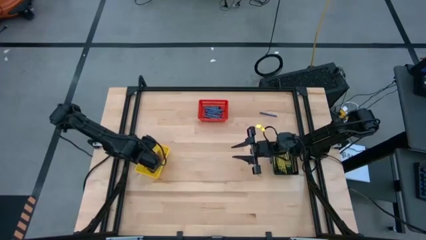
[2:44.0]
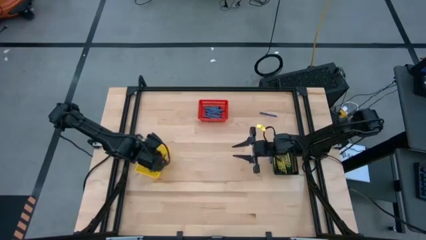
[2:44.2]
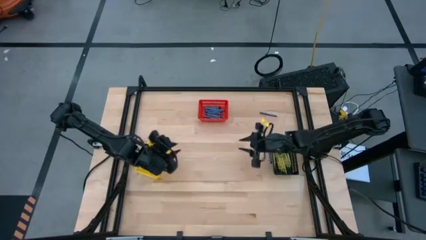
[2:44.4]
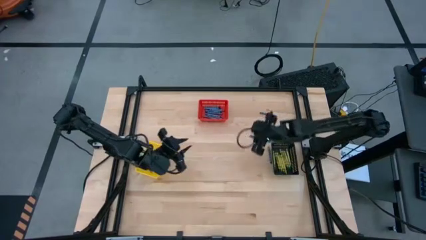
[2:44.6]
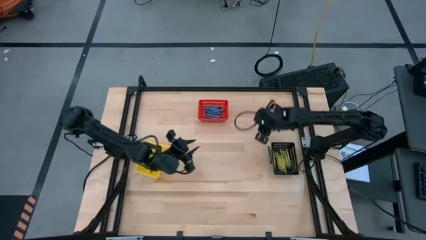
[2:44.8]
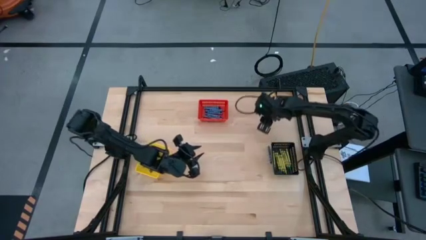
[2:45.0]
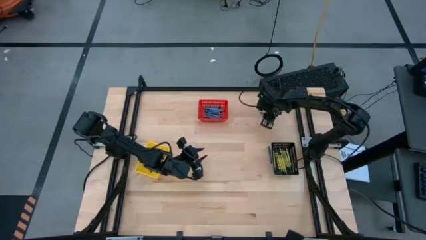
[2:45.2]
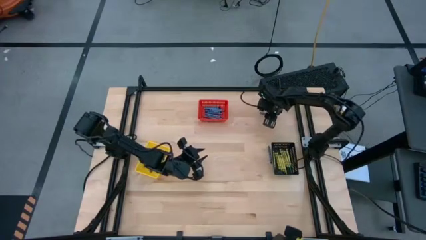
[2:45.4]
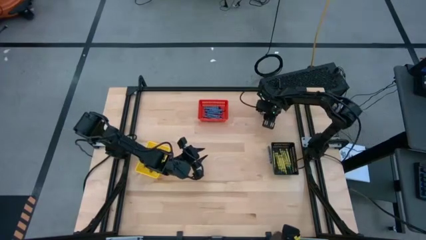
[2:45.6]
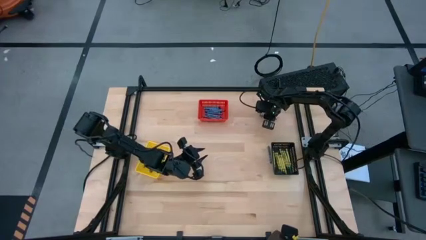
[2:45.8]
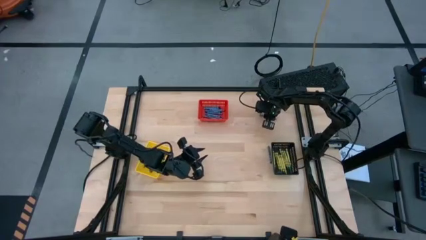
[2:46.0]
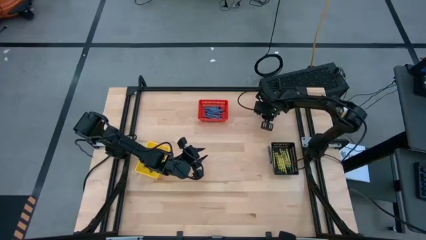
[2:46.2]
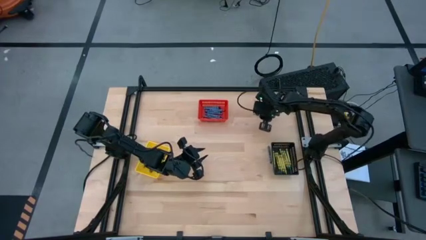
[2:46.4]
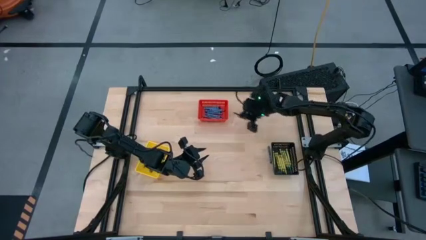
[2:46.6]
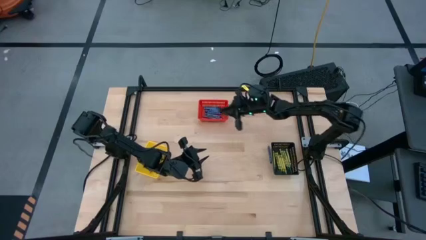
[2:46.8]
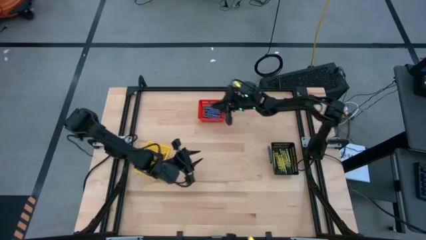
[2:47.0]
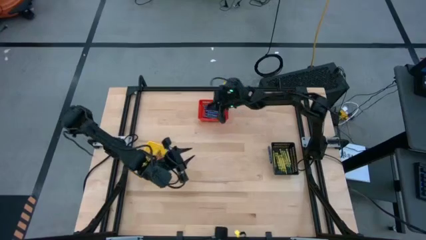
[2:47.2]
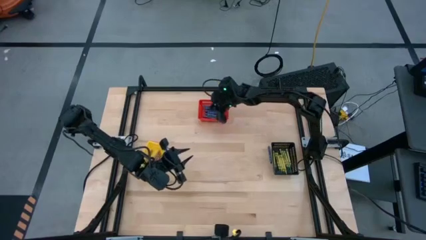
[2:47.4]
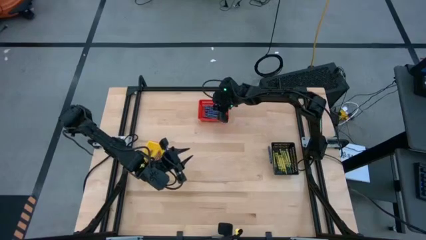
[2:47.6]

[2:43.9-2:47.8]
Task: Sort crayons
Put the blue crayon into the red basket

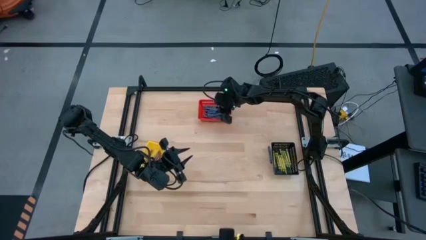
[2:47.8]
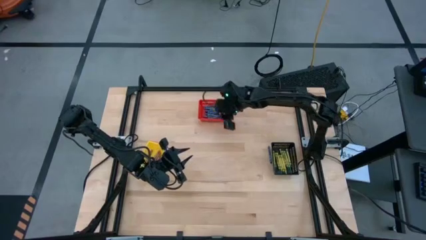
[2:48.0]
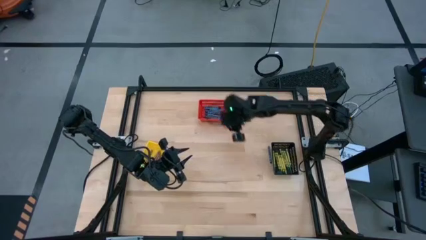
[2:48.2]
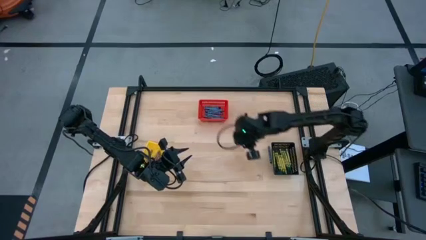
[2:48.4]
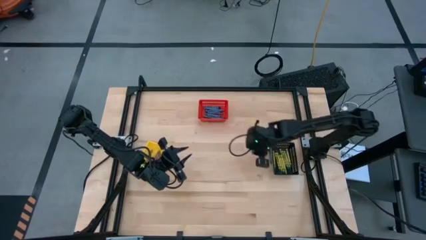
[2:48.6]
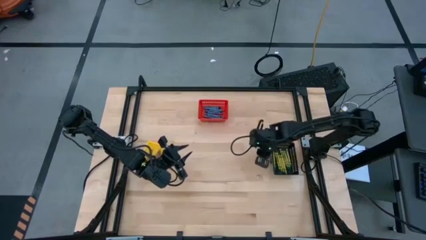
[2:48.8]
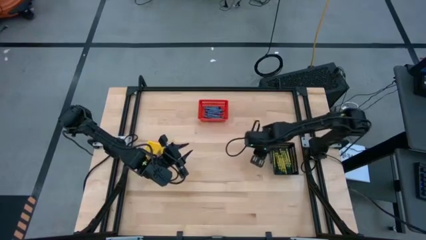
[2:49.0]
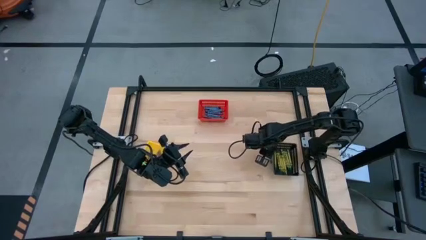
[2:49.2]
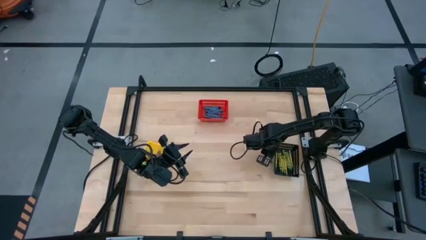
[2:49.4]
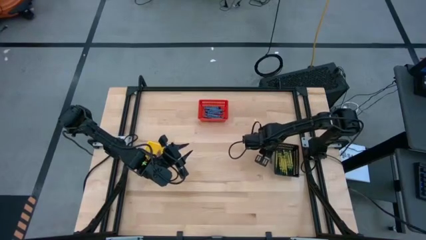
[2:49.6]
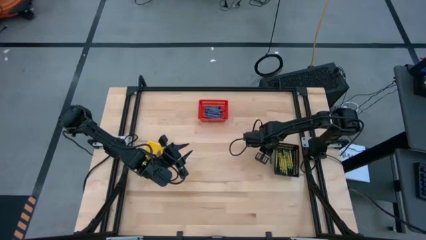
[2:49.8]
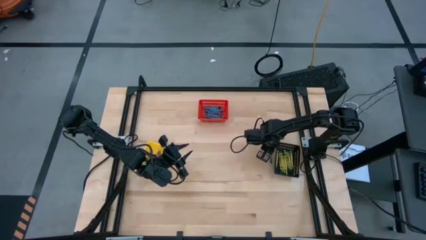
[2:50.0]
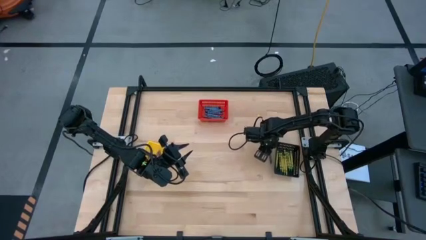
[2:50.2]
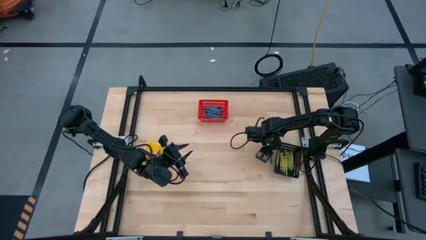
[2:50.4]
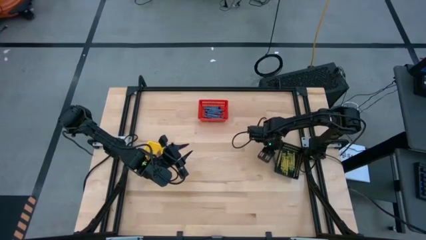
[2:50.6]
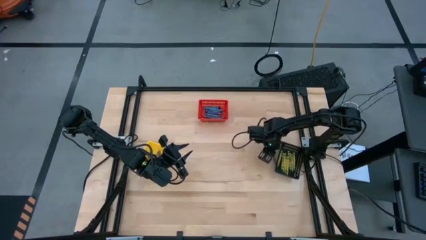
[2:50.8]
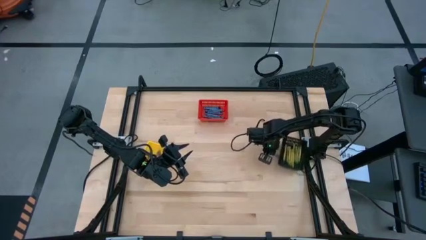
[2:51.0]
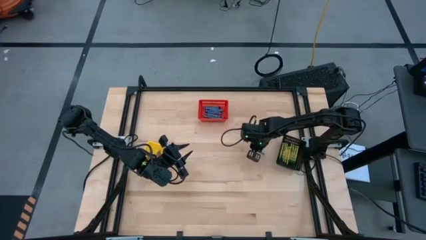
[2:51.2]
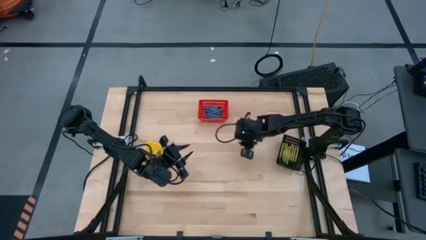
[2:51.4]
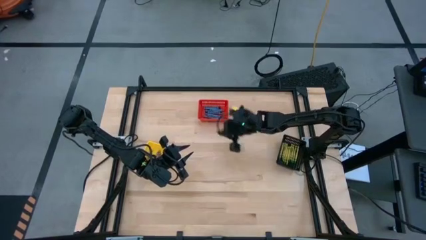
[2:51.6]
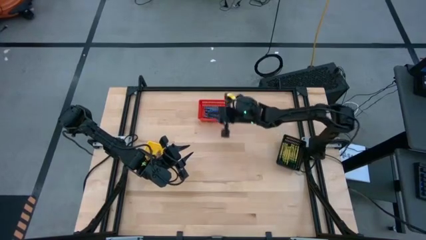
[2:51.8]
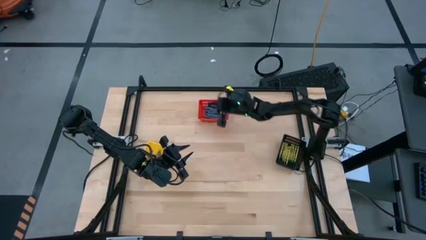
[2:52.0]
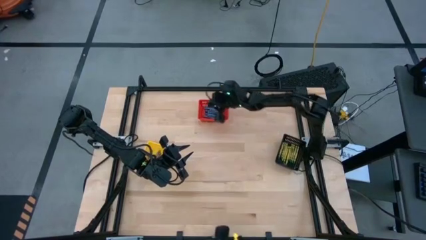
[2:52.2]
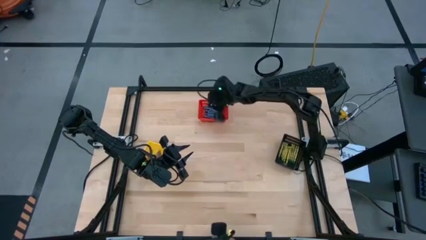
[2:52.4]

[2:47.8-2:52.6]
Put the blue crayon into the red basket

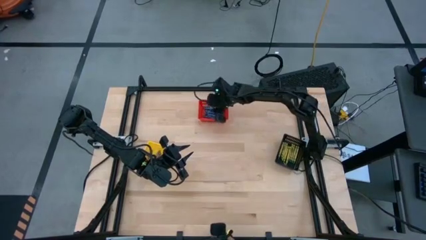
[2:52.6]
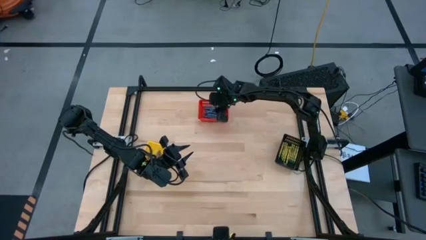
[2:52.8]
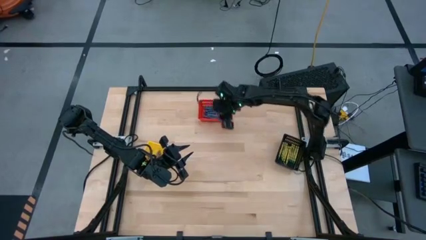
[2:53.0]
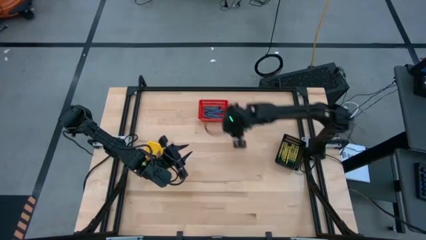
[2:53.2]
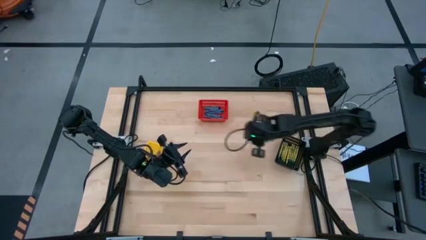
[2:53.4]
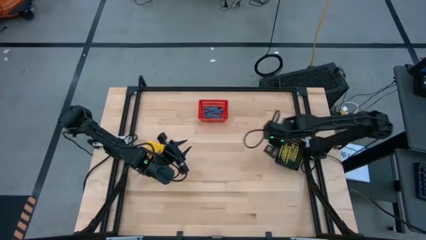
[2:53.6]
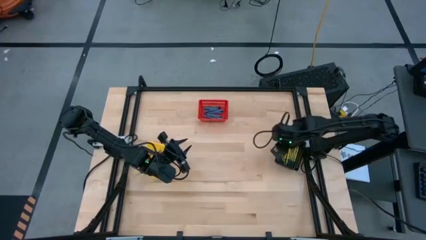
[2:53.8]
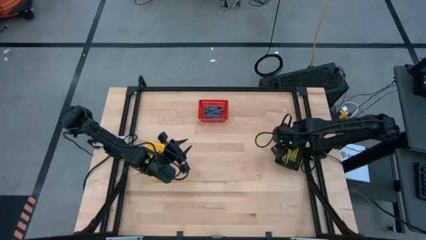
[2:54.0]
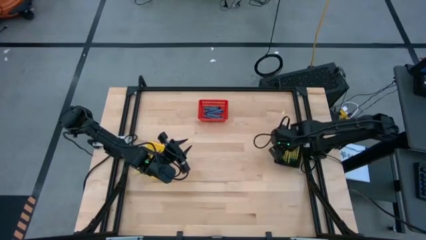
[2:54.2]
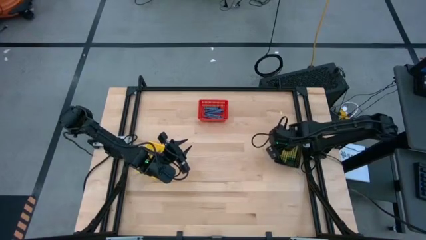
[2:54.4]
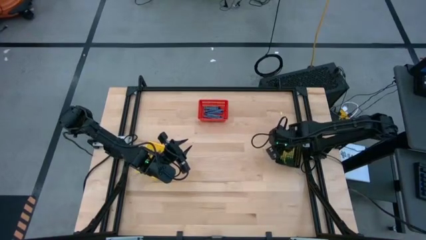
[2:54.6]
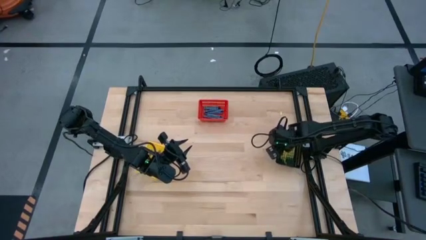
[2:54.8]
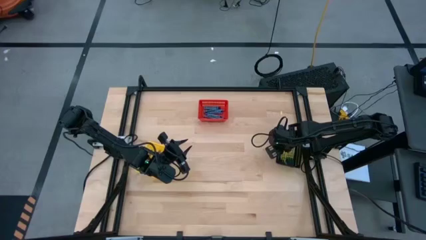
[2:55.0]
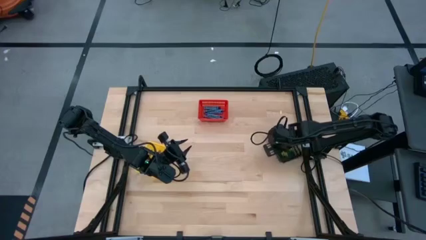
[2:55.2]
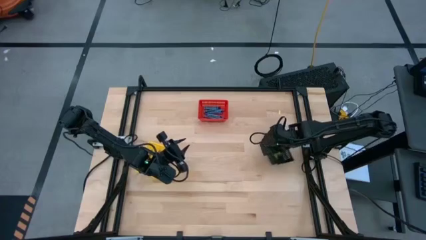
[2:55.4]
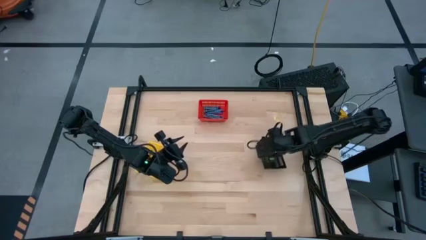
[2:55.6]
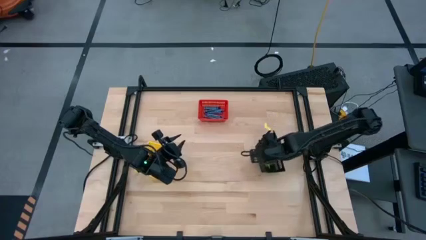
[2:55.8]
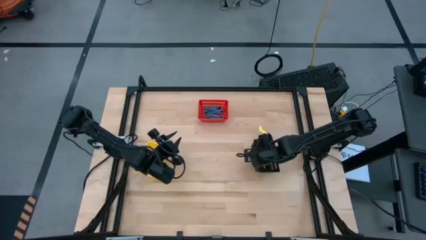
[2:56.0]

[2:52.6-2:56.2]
Adjust the black basket

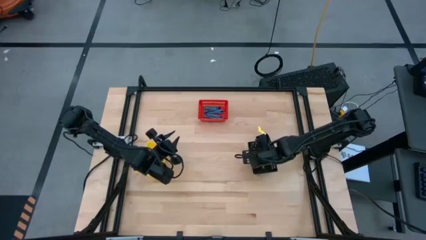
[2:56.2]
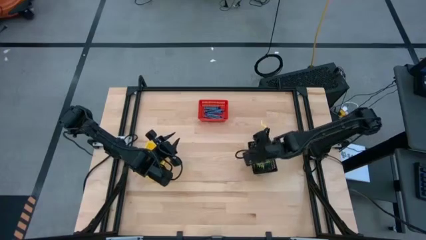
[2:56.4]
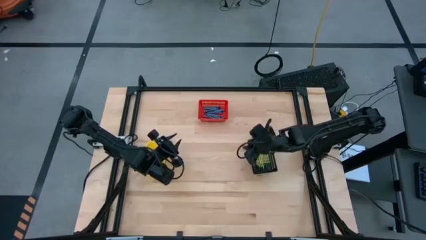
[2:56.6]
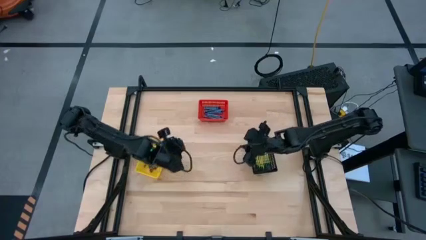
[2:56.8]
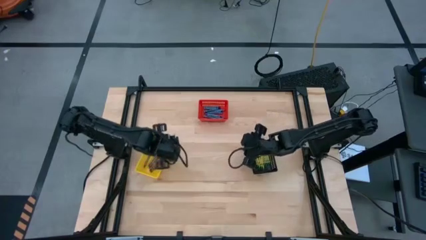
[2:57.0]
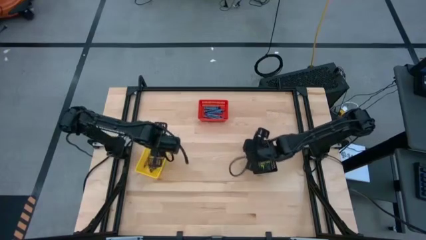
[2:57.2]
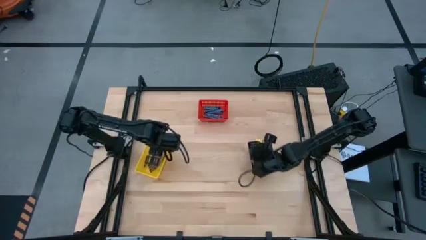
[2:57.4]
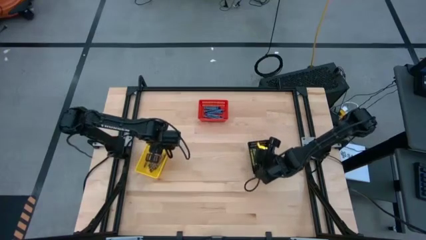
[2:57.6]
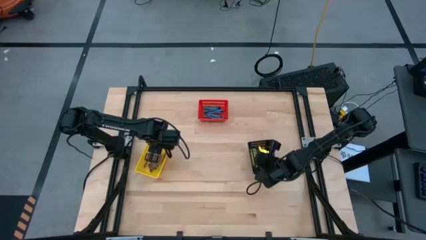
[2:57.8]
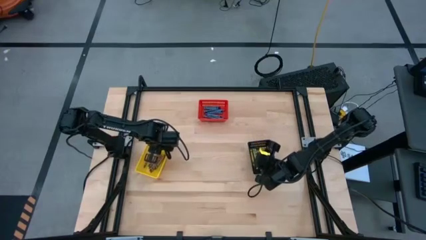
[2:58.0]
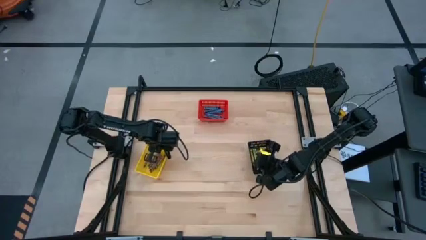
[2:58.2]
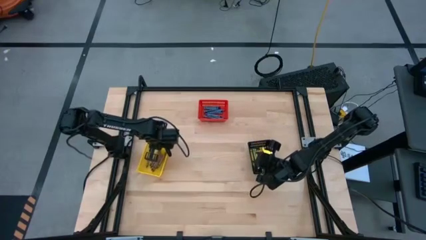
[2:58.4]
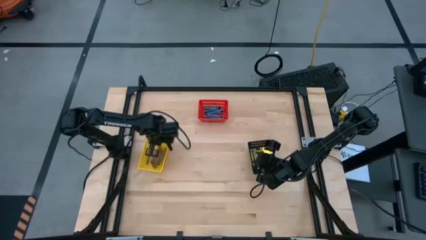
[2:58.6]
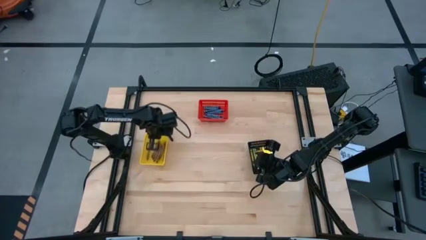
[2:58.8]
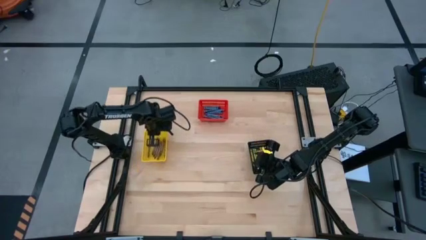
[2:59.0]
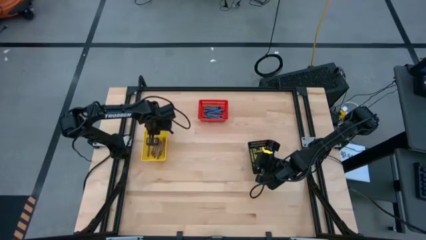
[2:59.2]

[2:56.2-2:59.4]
Adjust the yellow basket

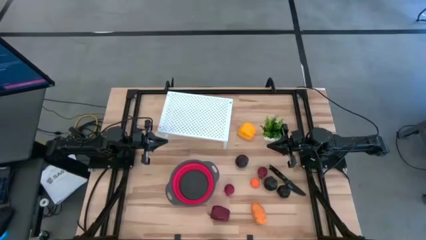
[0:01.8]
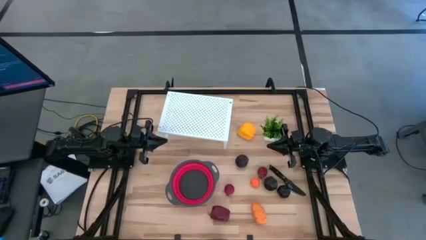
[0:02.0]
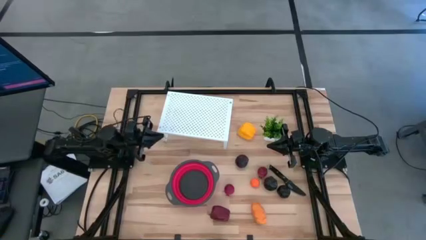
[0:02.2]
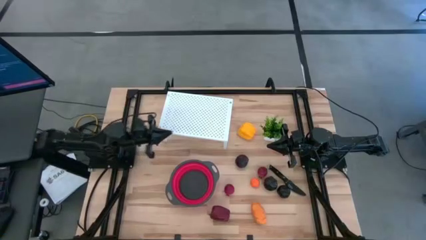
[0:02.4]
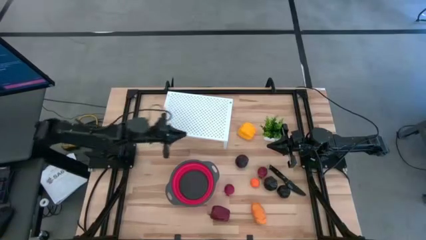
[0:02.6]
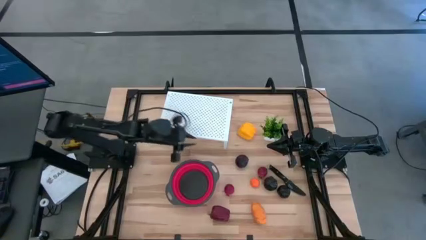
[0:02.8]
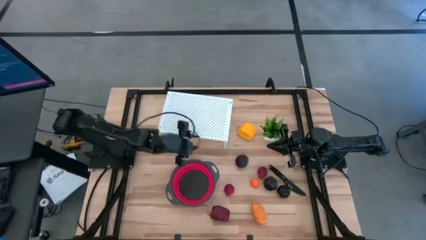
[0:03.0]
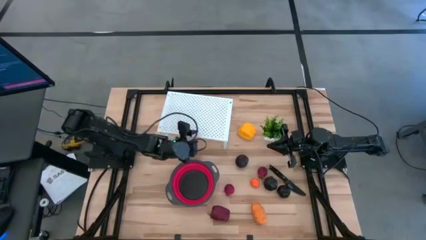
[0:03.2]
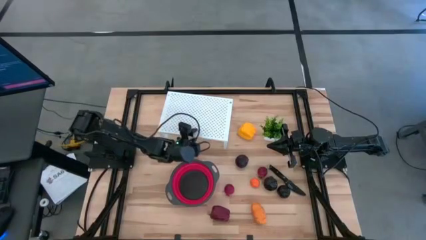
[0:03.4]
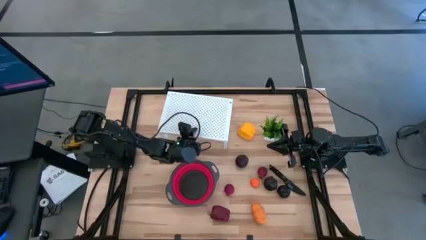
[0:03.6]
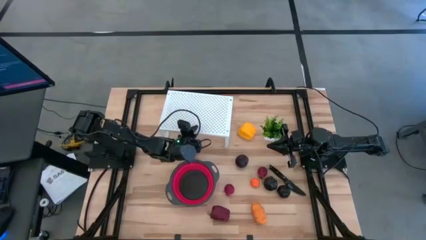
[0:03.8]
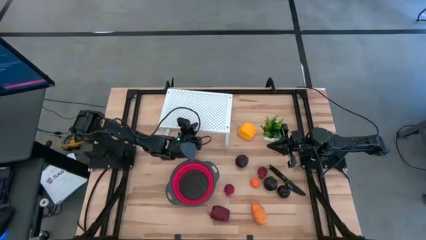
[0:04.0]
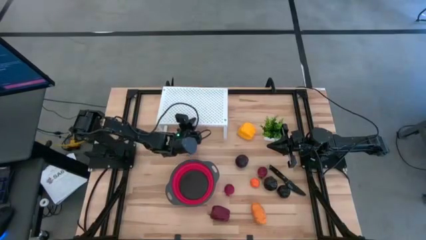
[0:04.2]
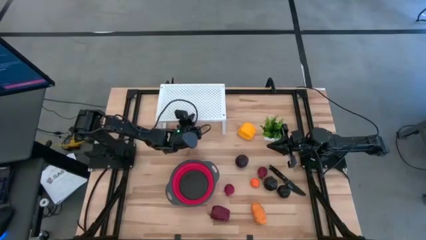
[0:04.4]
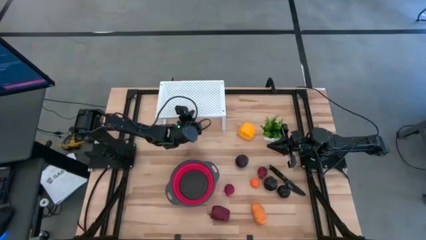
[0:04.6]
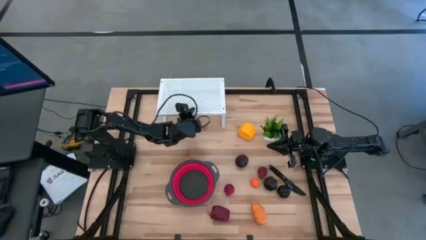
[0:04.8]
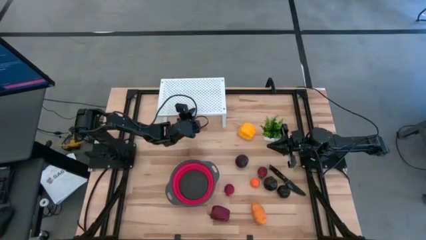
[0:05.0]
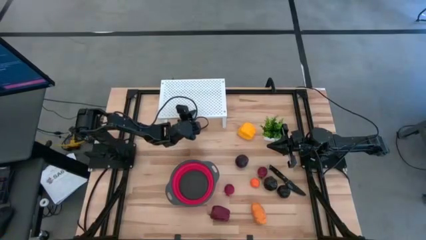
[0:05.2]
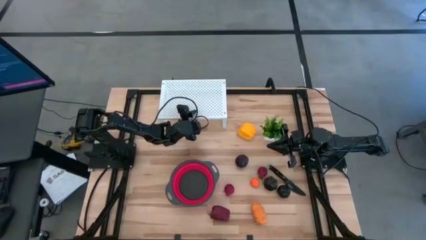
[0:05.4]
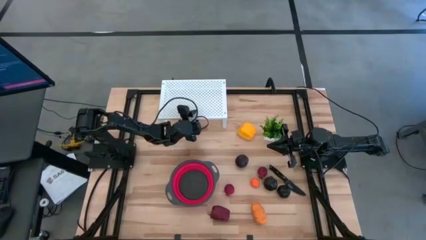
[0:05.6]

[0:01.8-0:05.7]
Task: Pick & Place Fruit
Prepare the shelf
